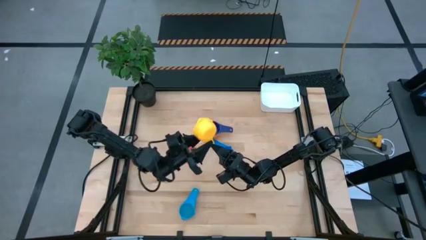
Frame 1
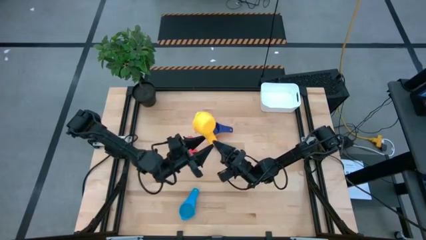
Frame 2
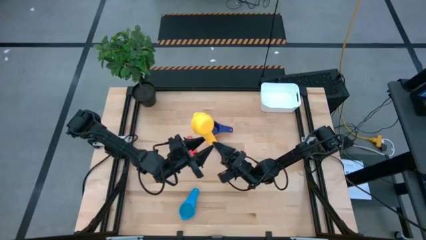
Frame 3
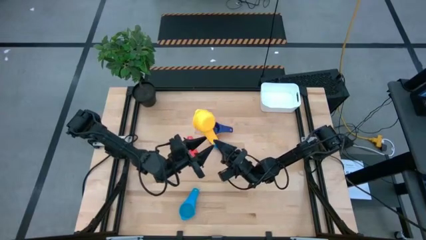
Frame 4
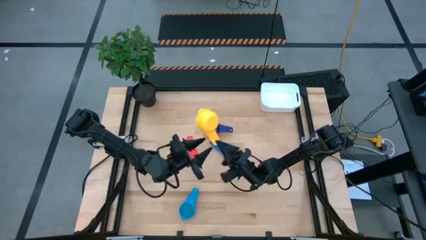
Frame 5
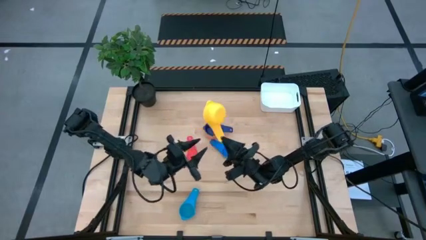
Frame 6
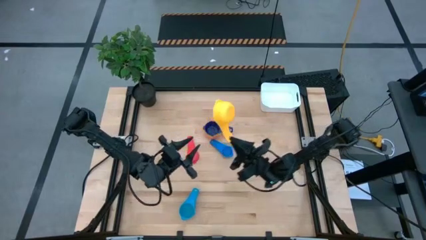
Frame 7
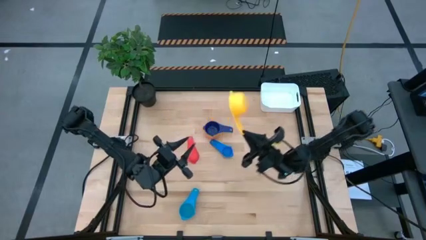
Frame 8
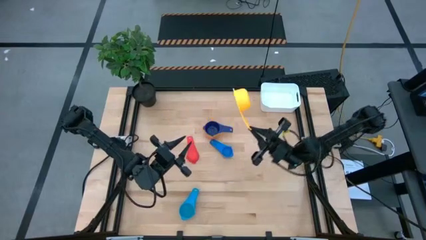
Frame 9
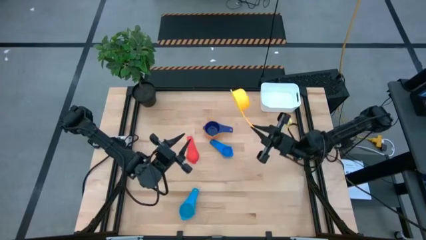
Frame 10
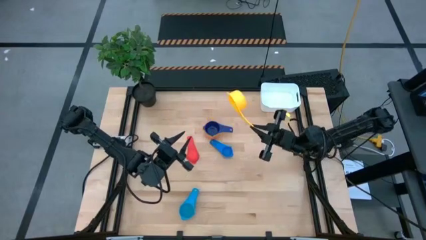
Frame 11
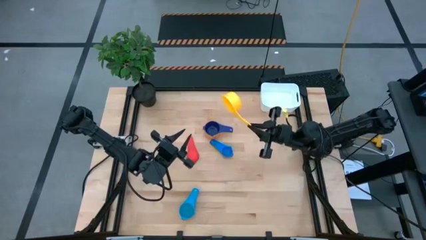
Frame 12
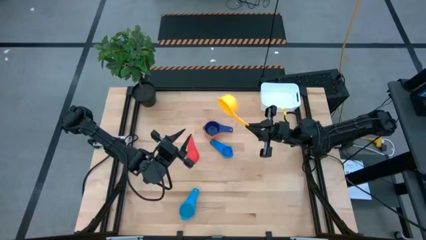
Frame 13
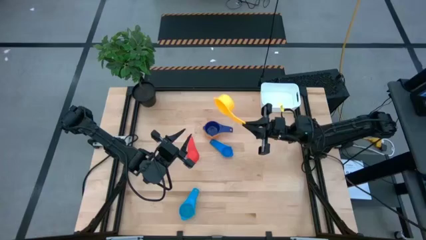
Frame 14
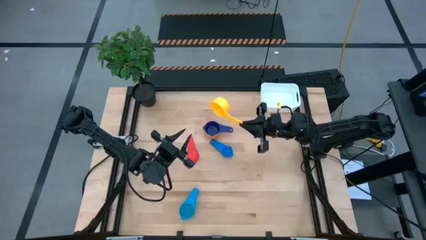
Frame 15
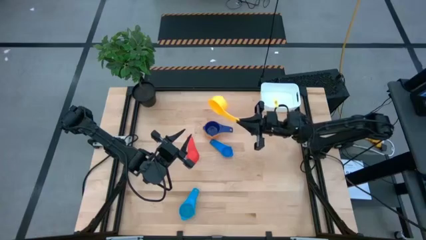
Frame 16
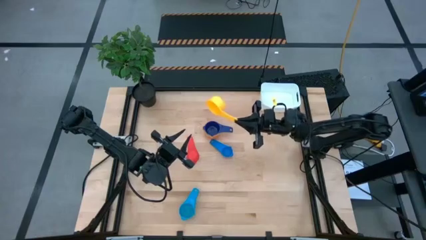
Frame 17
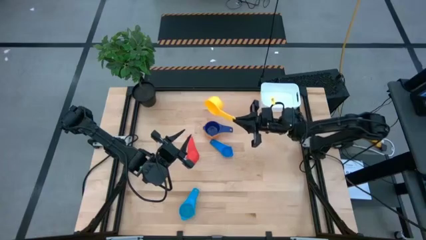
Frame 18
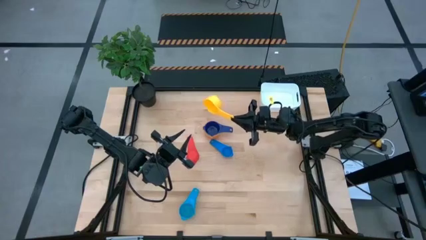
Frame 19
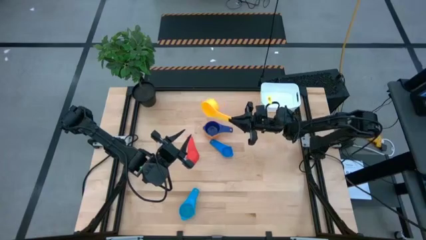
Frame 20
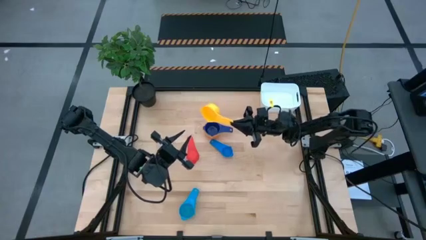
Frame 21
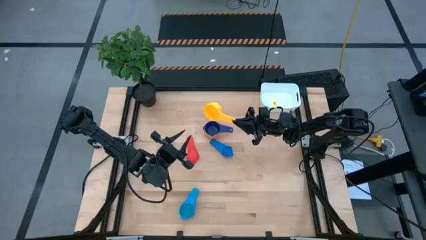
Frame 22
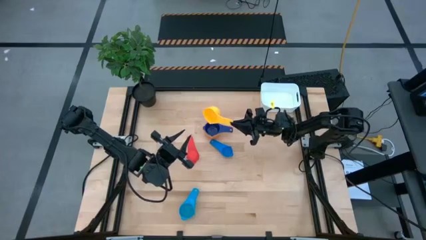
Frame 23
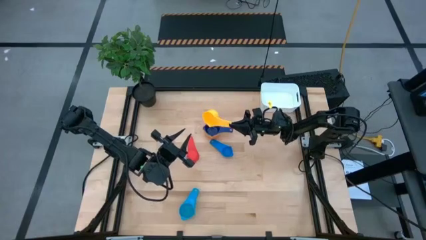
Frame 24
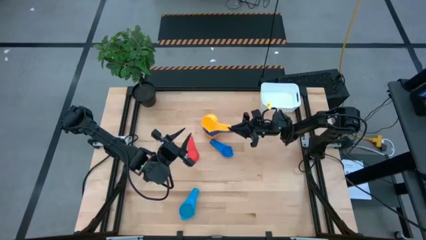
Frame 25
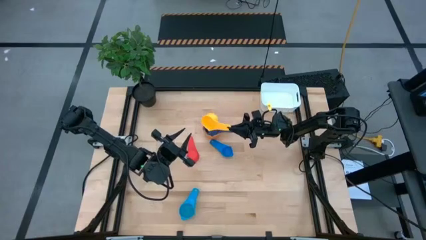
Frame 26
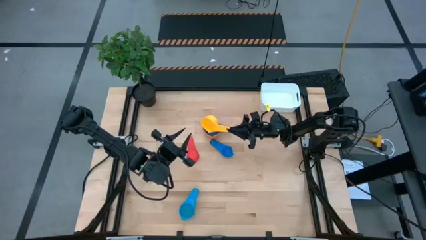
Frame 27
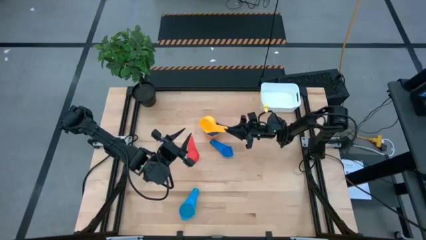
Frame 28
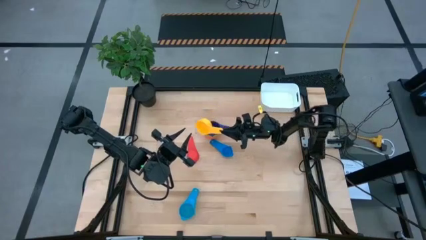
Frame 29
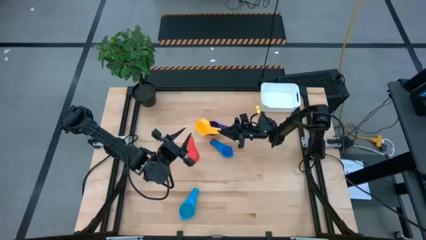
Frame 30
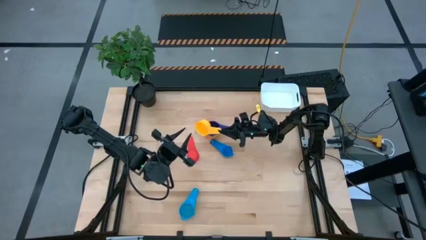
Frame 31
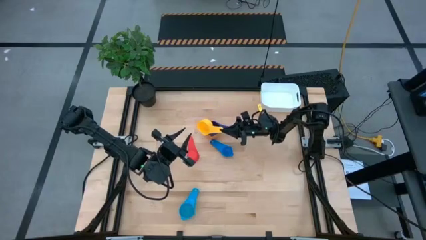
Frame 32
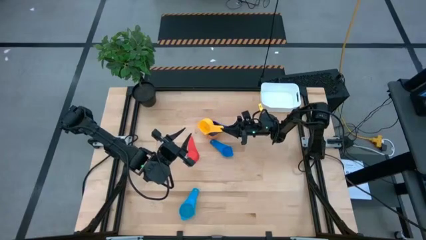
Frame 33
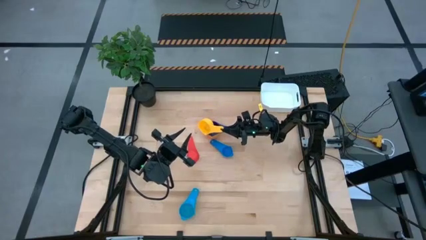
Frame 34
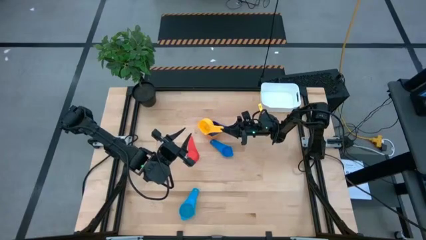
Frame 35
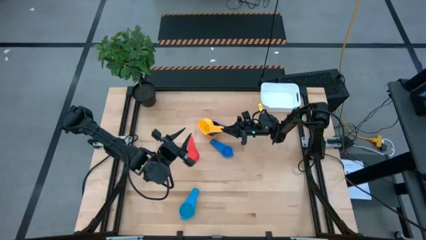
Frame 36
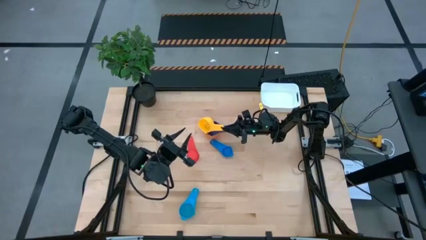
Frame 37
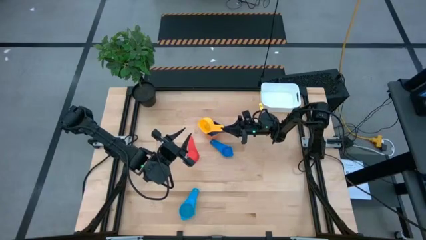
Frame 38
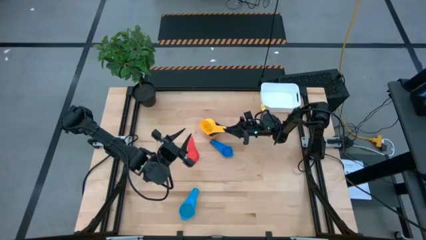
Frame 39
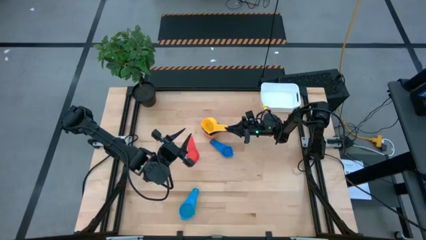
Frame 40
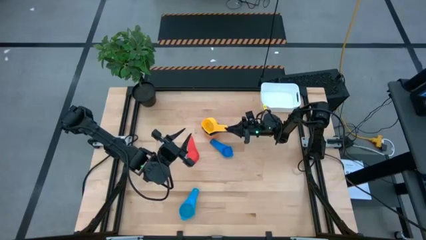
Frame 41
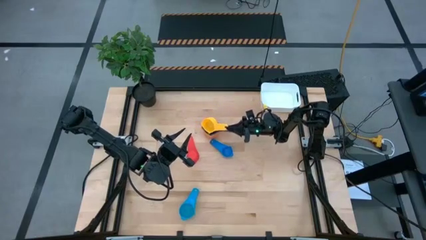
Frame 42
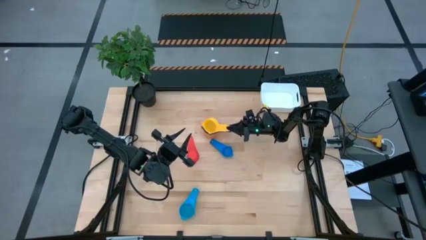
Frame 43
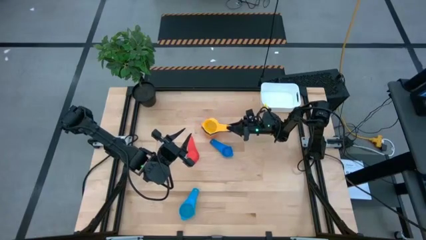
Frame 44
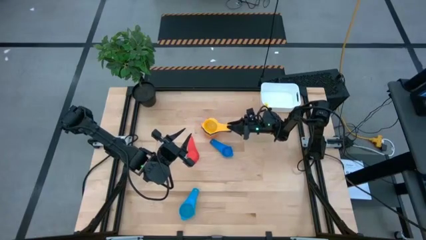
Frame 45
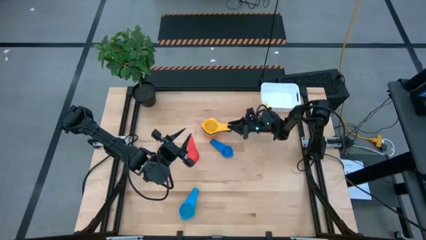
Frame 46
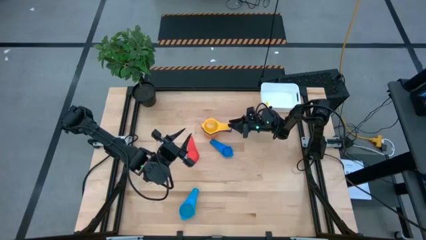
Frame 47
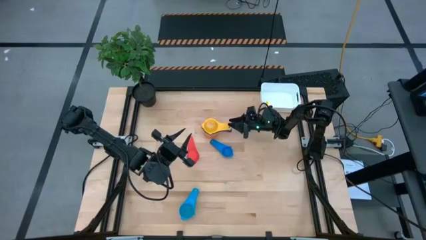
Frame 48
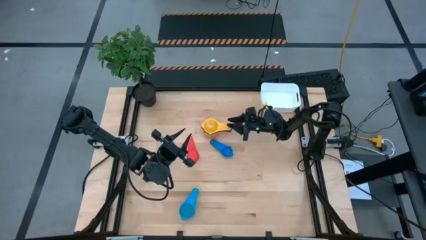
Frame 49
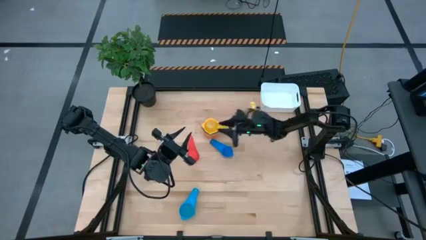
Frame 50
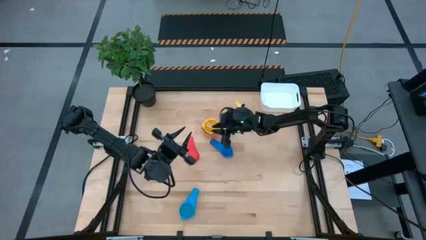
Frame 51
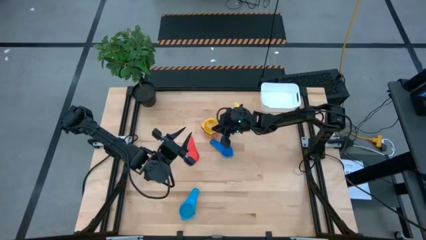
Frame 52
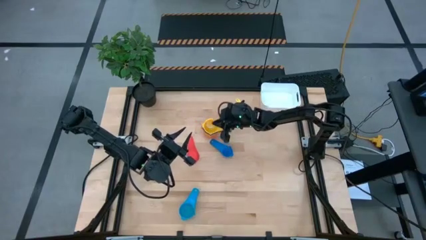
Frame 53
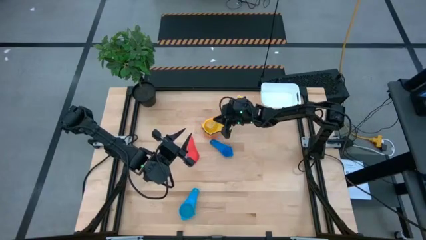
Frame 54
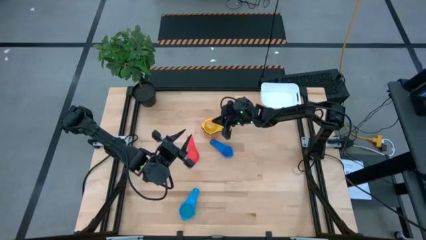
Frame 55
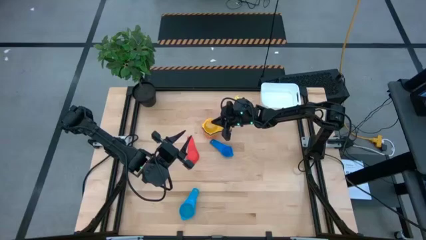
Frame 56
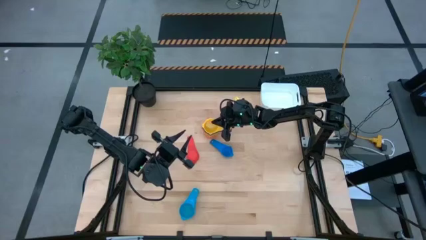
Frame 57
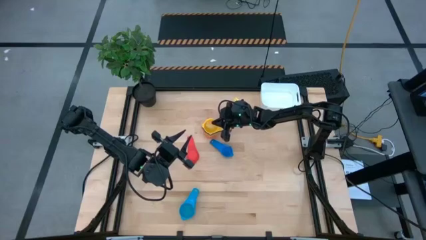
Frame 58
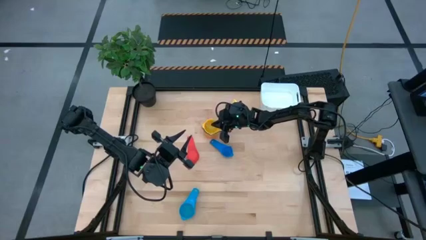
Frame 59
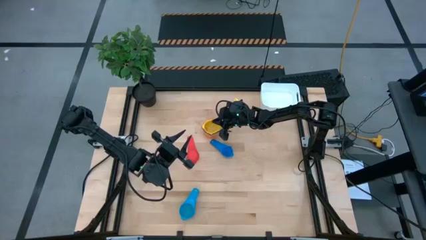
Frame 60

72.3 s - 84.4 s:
Task: Nest measuring cups in basket
Stack the yellow measuring cup into the dark blue measuring cup
